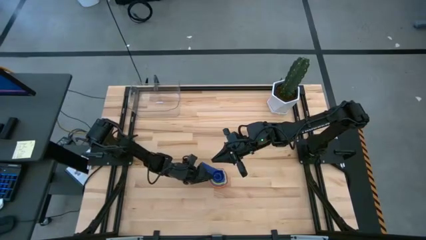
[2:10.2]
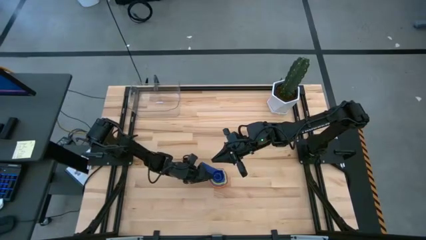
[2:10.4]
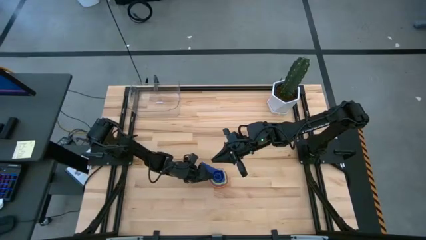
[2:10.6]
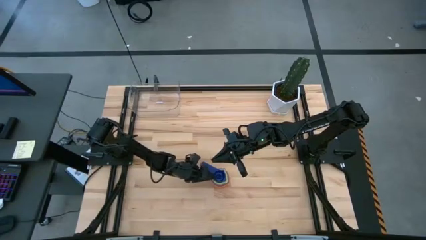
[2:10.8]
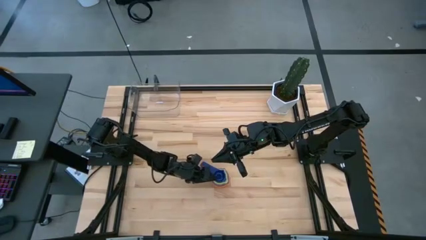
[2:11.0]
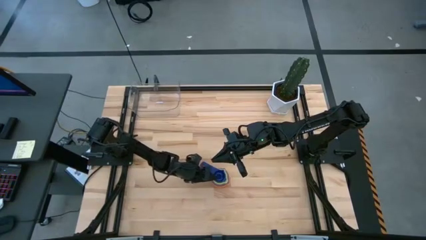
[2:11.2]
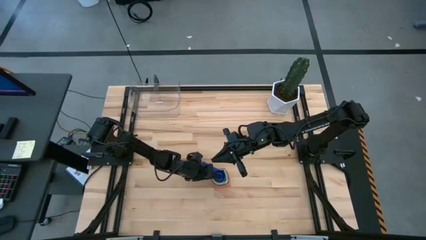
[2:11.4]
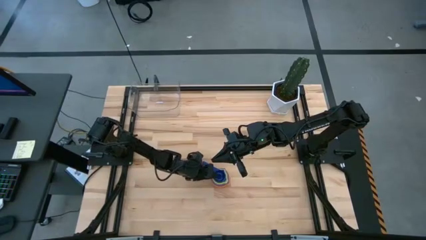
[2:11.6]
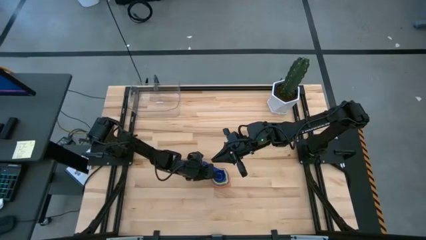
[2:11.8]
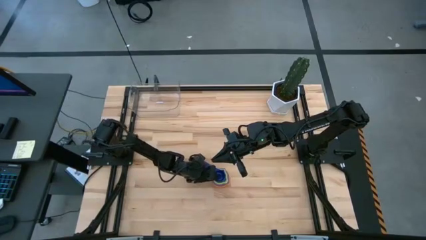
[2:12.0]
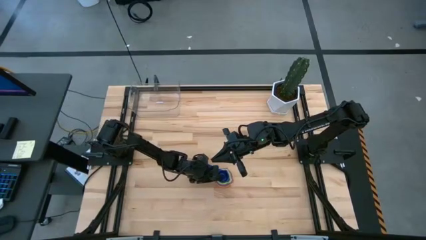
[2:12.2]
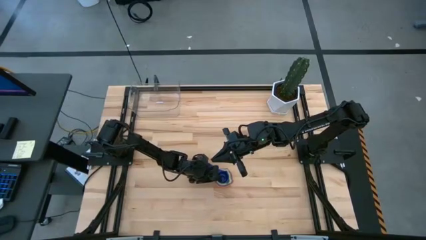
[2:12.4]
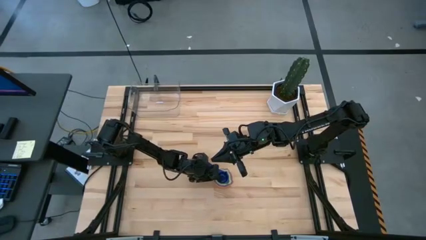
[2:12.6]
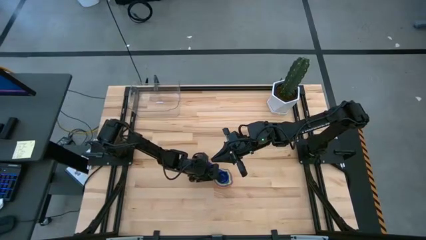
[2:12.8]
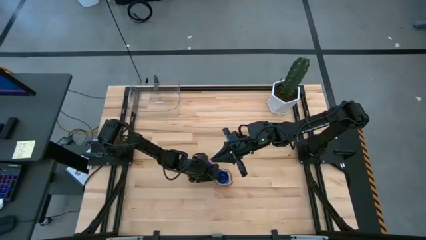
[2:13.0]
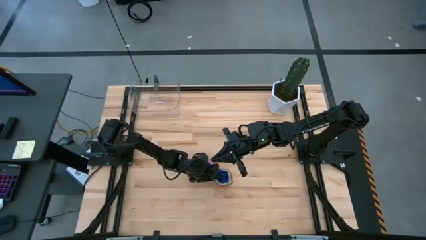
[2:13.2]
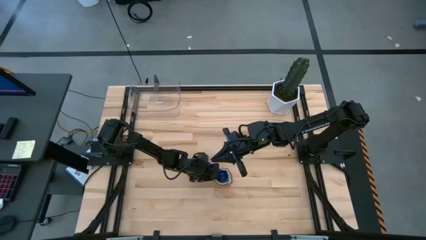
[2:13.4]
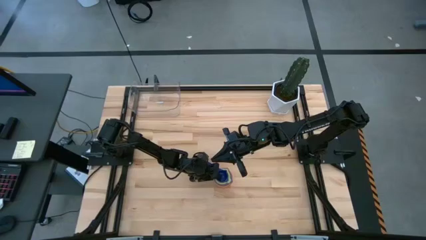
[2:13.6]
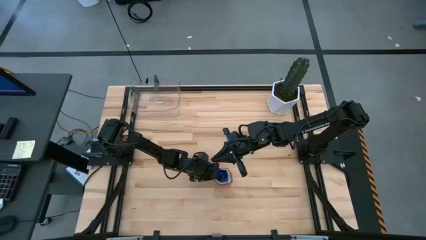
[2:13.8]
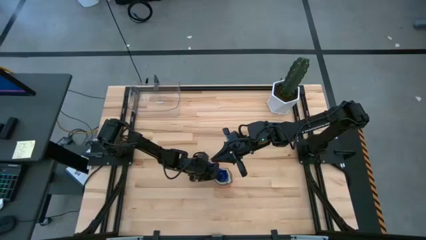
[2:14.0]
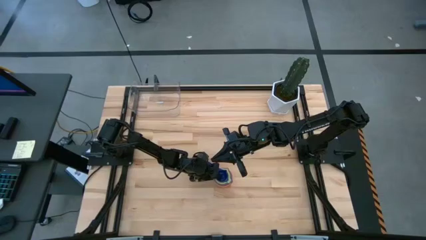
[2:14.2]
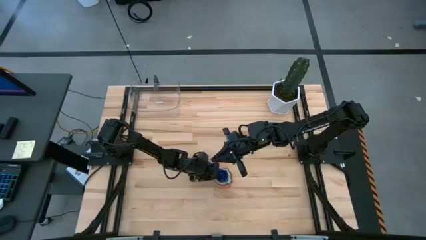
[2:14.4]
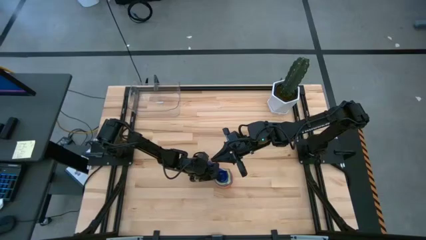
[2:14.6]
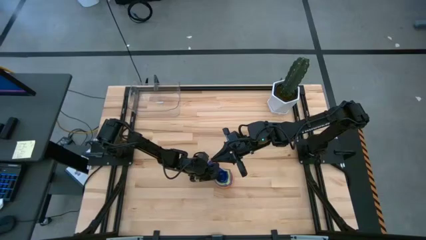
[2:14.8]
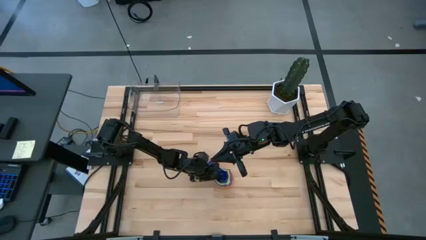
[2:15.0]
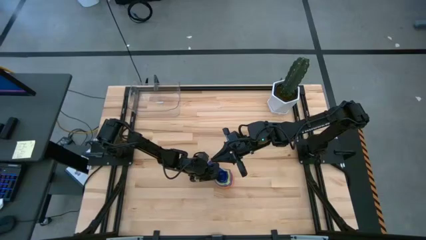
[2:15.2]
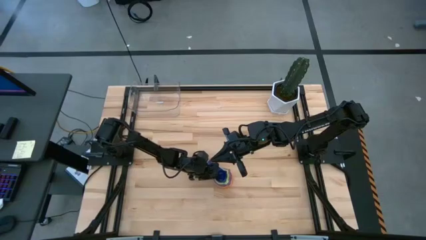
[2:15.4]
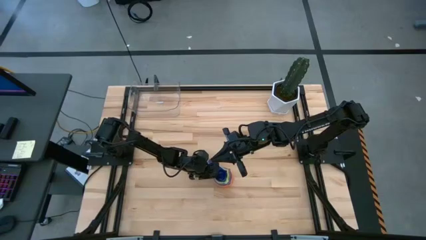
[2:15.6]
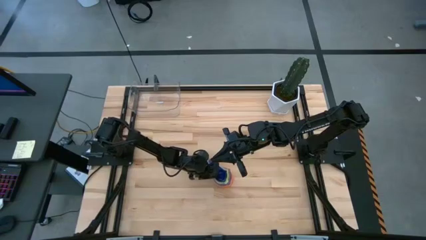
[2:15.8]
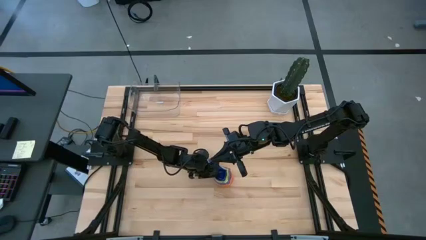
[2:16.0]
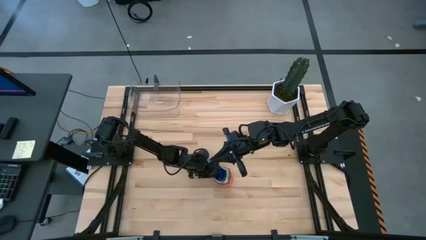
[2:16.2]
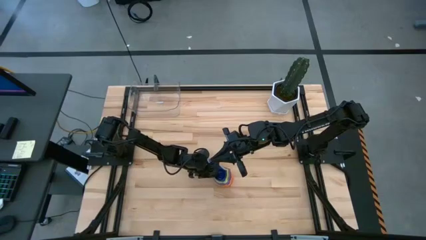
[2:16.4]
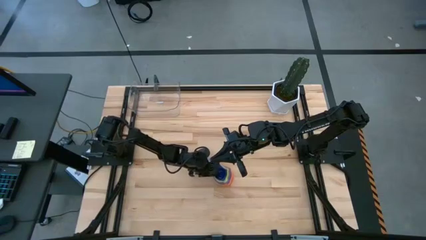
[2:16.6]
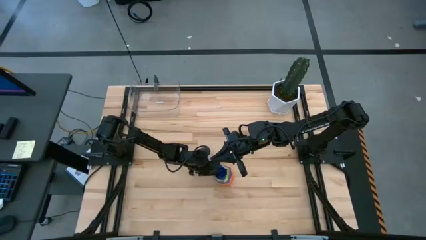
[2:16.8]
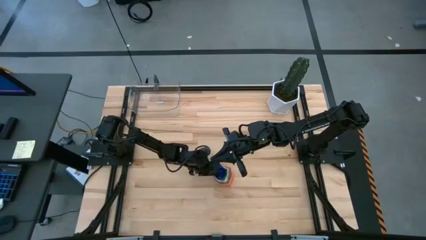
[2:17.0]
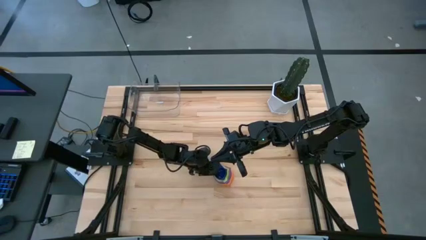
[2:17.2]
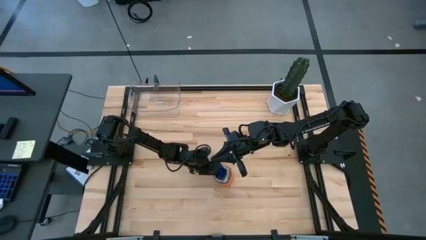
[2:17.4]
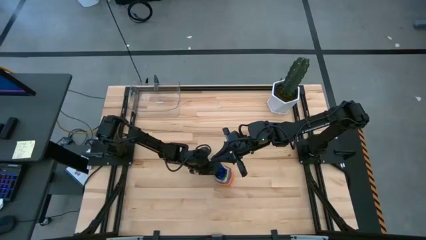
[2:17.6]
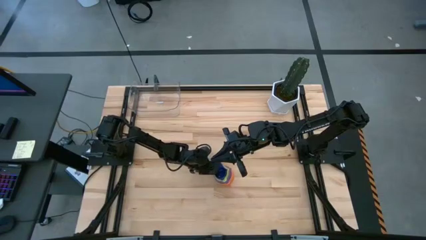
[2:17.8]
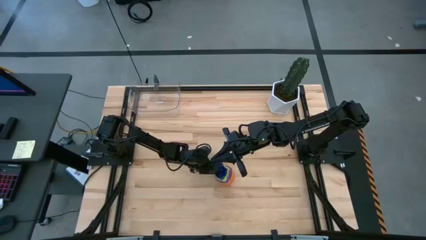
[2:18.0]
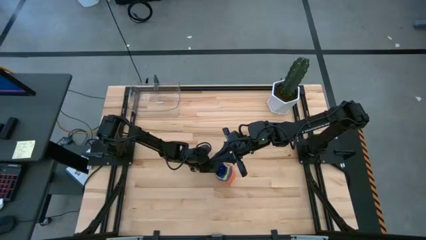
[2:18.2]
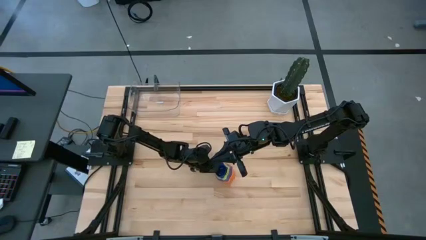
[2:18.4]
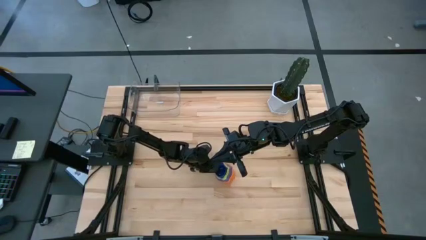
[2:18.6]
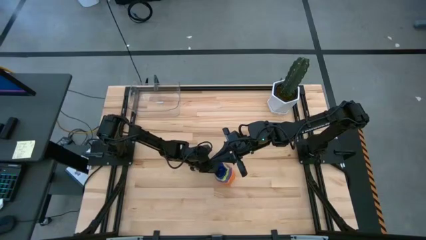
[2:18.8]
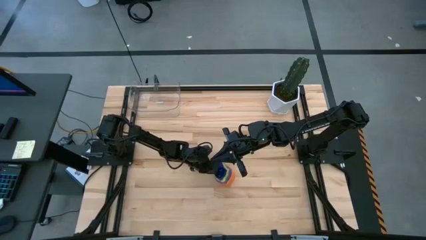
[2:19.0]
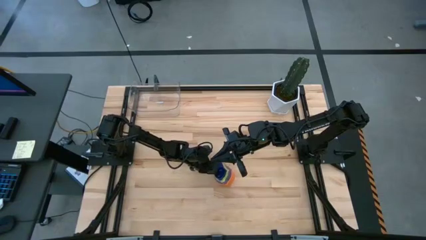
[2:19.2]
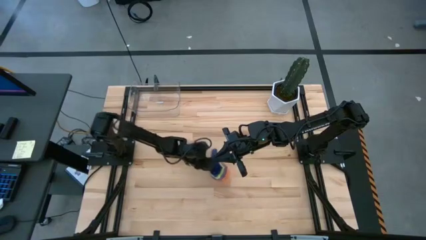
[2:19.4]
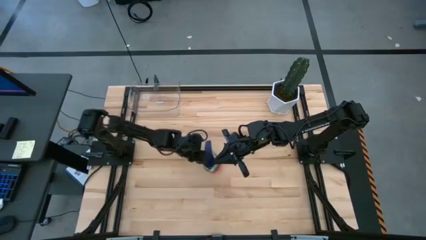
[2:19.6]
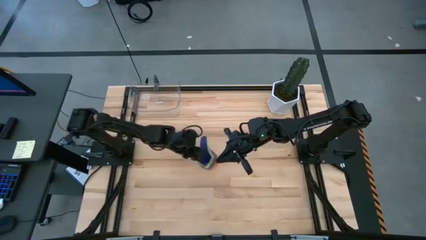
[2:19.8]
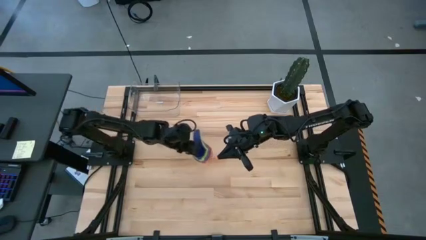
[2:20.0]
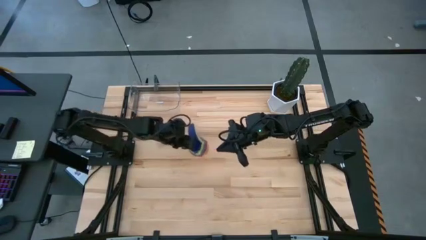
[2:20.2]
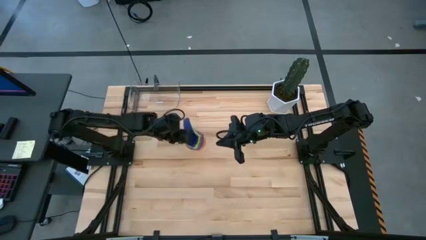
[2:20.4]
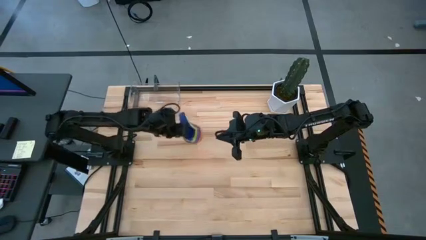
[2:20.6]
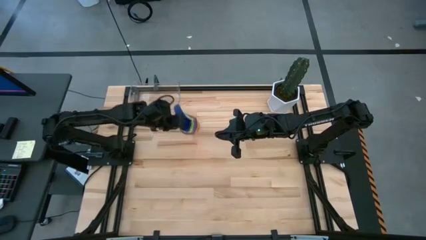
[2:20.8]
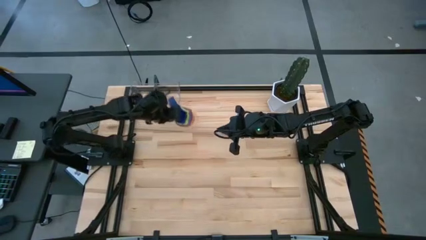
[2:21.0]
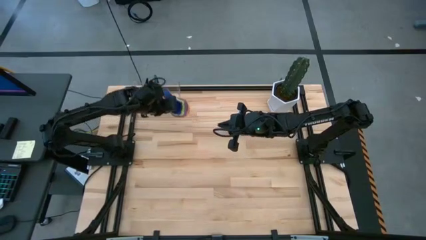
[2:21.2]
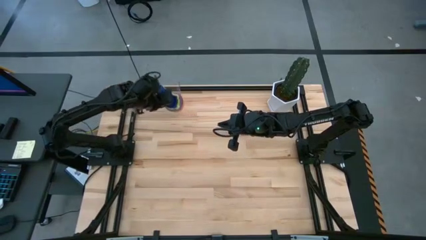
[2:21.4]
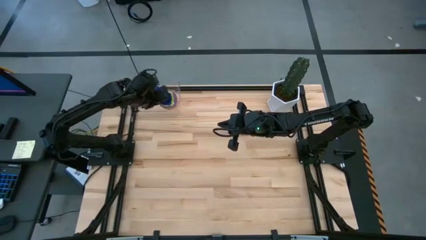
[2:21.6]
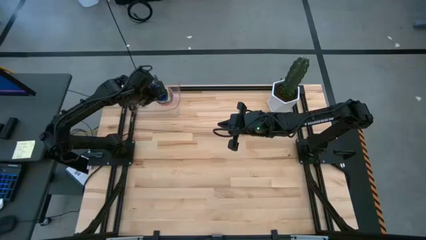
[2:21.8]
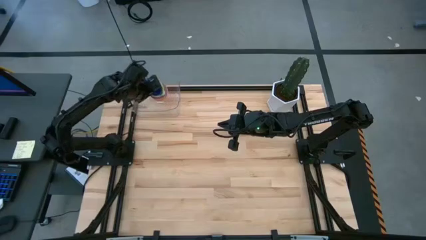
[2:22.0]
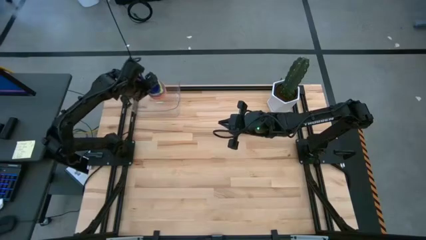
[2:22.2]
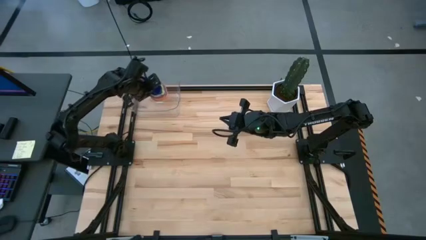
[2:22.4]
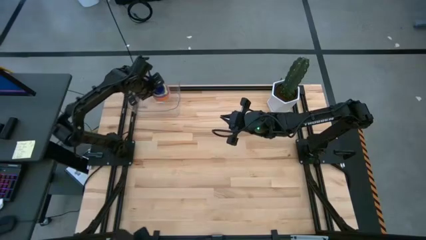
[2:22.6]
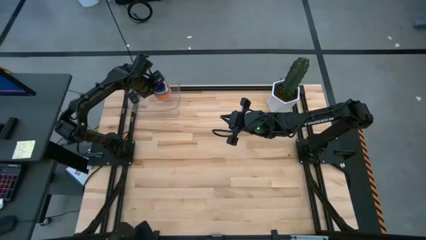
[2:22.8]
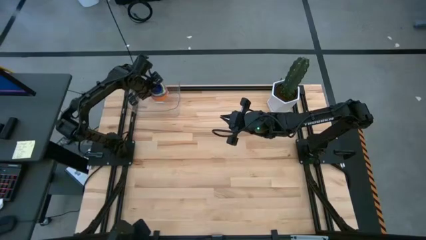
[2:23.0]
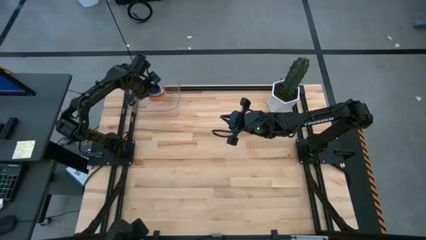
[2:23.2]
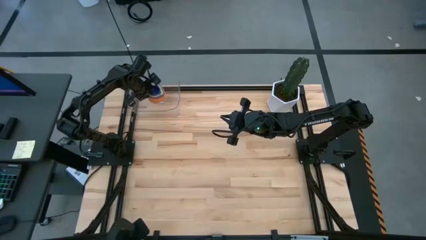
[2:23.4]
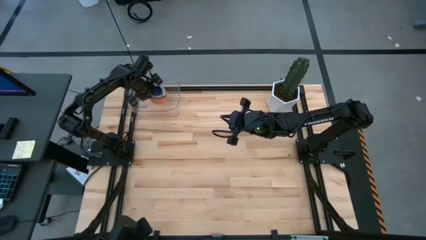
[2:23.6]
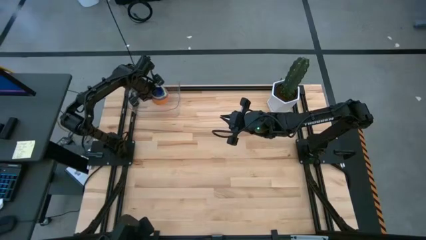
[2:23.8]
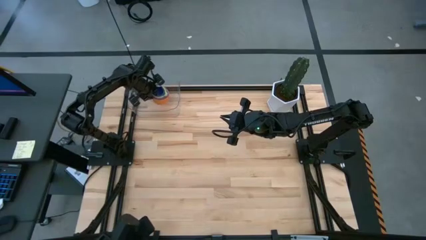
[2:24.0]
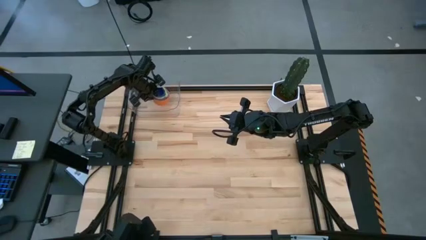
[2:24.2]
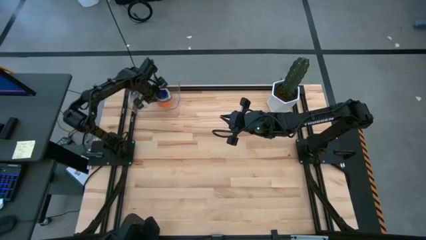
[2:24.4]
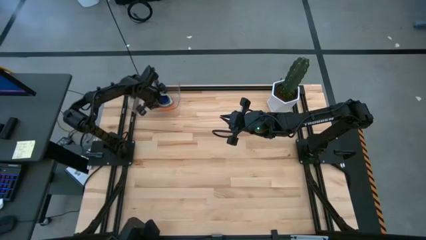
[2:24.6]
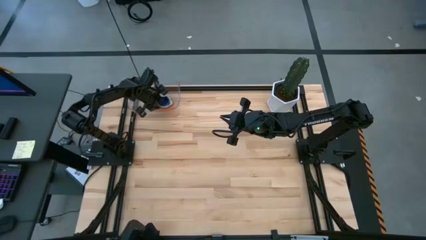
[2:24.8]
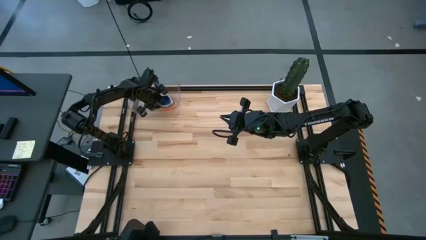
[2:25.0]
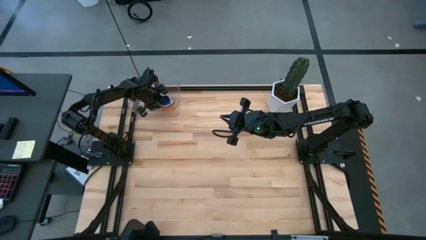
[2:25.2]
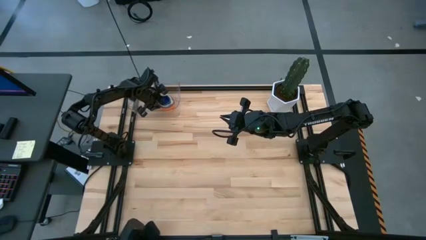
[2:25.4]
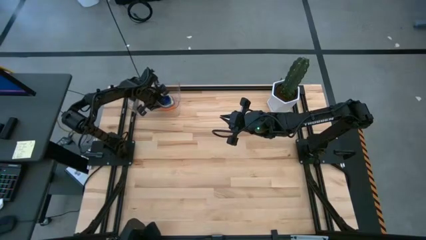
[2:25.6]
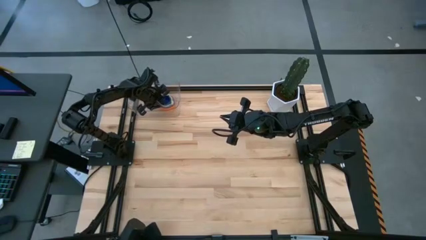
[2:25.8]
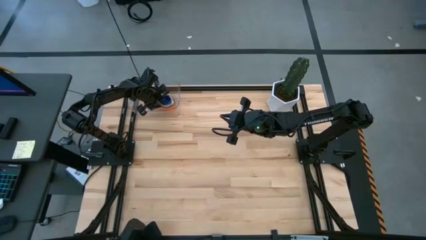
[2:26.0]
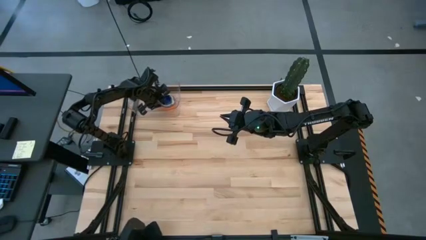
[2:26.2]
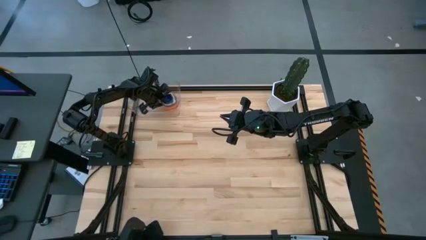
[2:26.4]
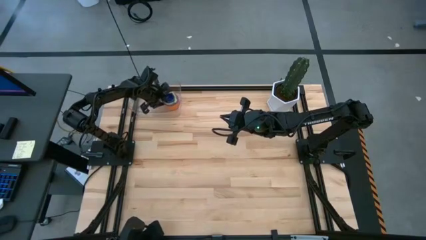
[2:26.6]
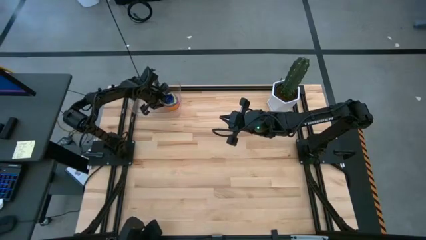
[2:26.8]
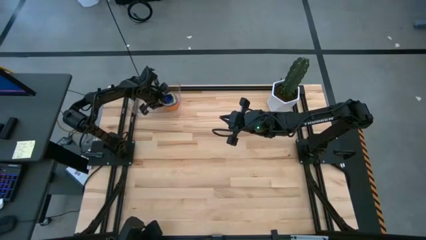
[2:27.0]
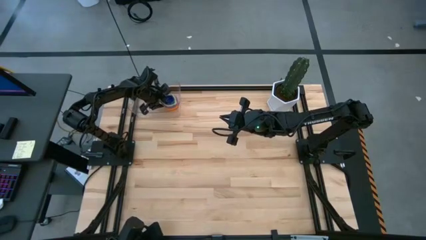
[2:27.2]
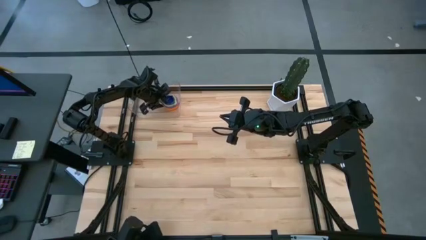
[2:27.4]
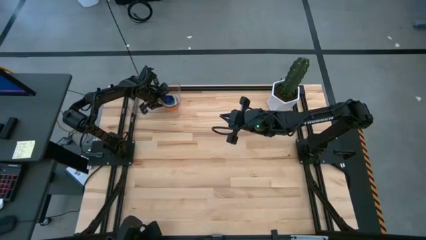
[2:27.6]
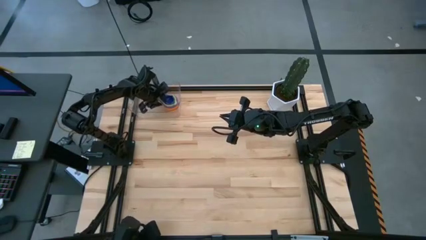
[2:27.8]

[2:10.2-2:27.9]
Task: Nest measuring cups in basket
Put the stacked nesting measuring cups into the transparent bin
